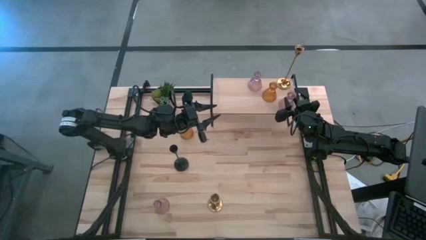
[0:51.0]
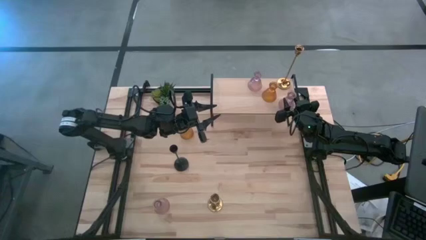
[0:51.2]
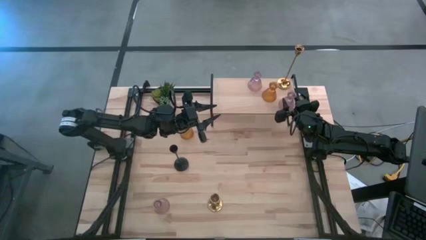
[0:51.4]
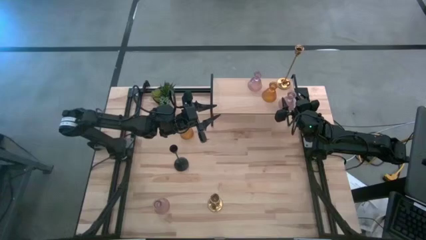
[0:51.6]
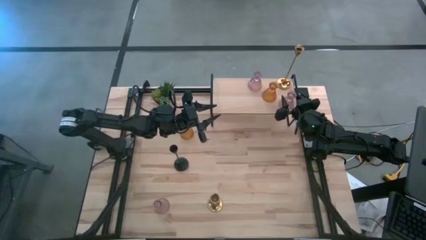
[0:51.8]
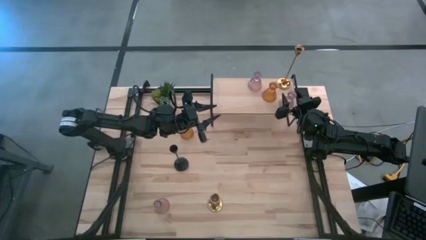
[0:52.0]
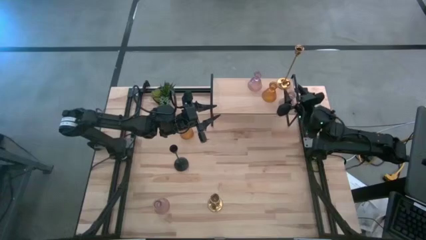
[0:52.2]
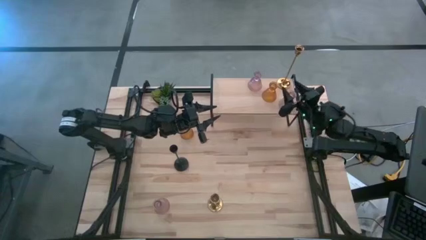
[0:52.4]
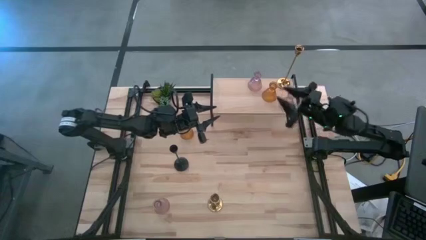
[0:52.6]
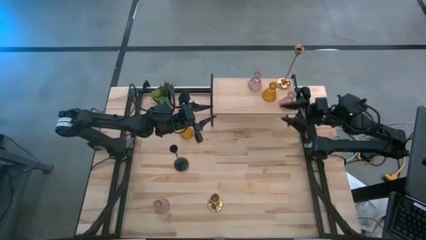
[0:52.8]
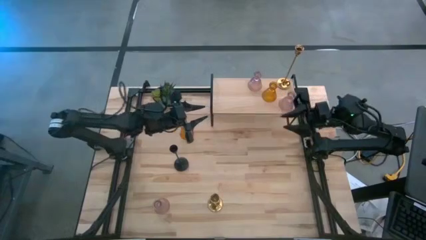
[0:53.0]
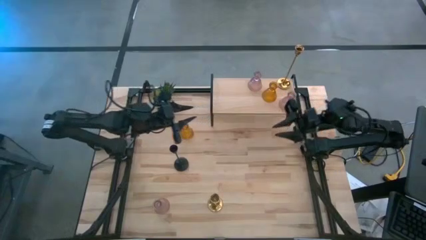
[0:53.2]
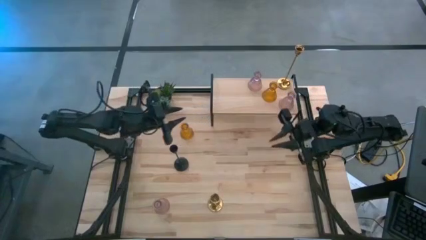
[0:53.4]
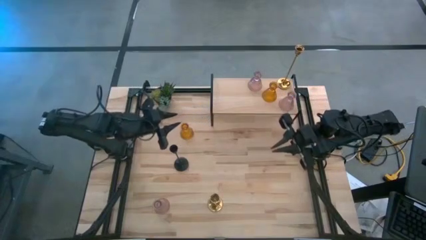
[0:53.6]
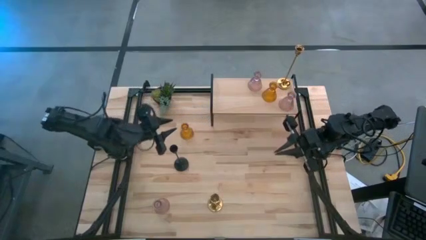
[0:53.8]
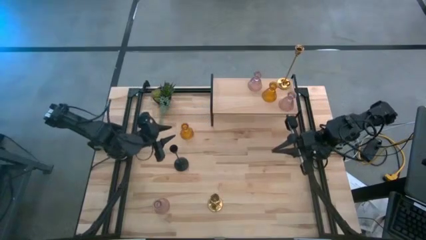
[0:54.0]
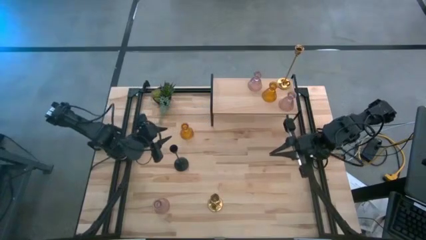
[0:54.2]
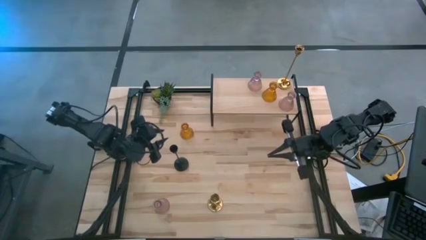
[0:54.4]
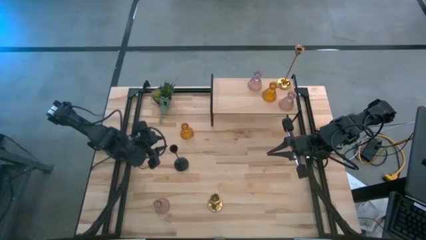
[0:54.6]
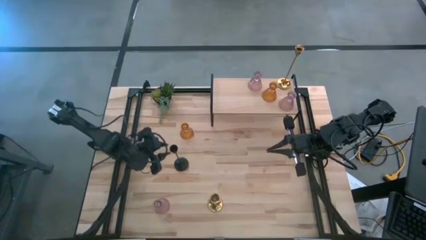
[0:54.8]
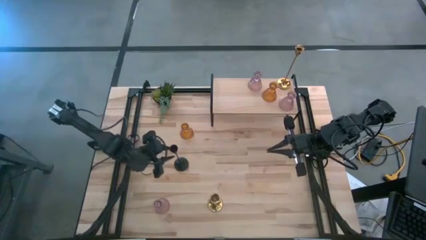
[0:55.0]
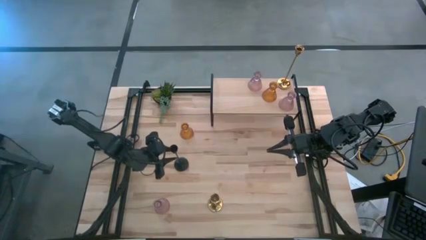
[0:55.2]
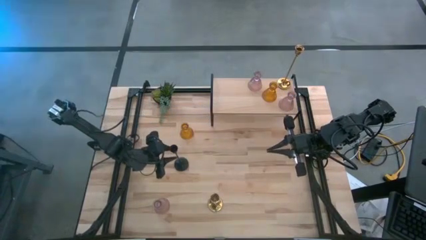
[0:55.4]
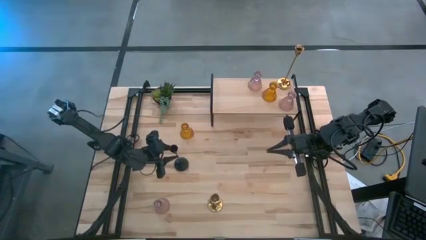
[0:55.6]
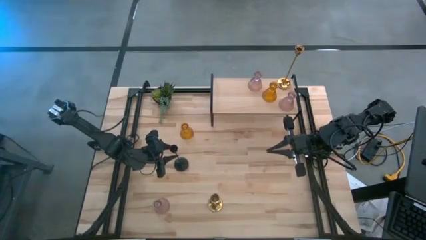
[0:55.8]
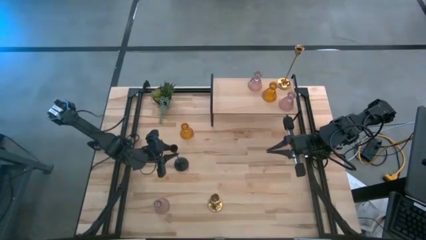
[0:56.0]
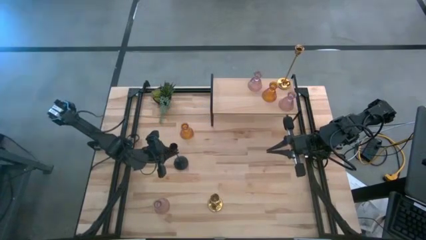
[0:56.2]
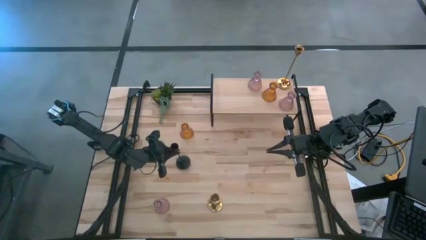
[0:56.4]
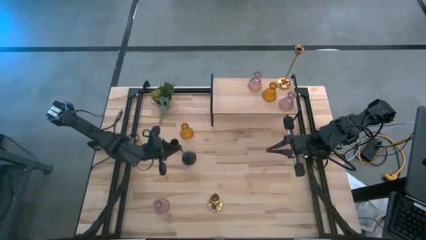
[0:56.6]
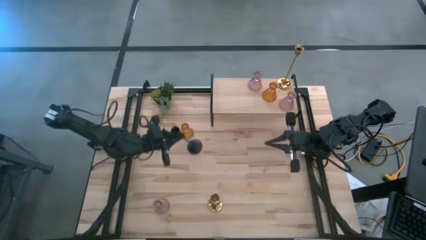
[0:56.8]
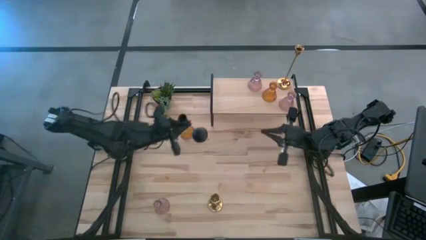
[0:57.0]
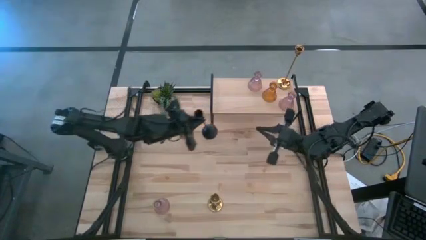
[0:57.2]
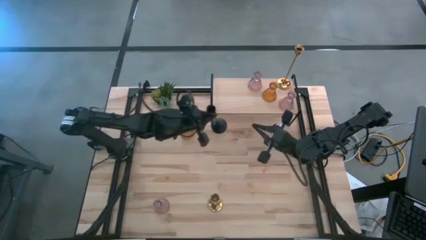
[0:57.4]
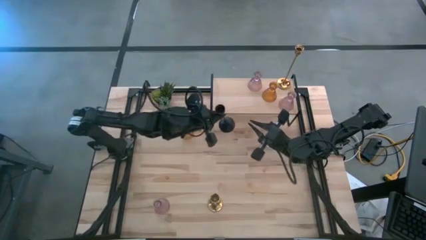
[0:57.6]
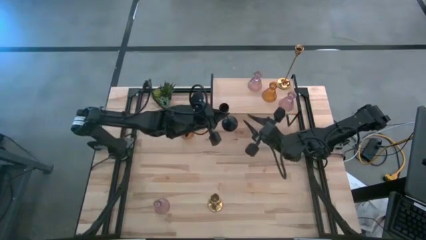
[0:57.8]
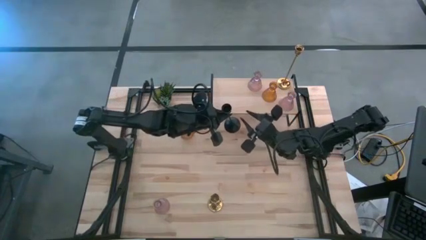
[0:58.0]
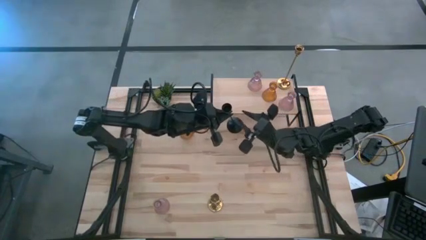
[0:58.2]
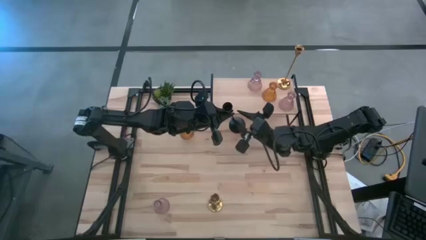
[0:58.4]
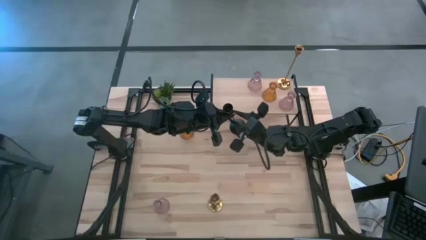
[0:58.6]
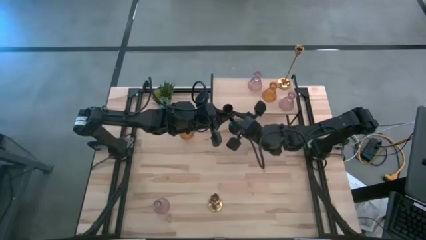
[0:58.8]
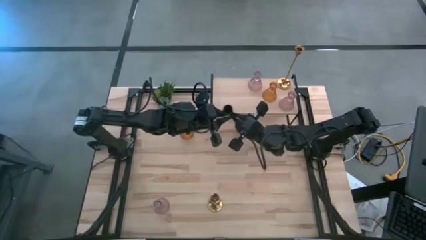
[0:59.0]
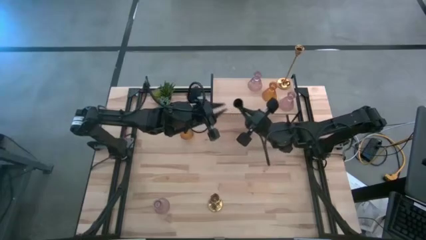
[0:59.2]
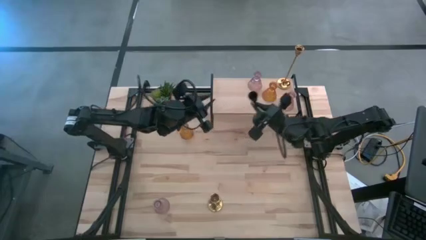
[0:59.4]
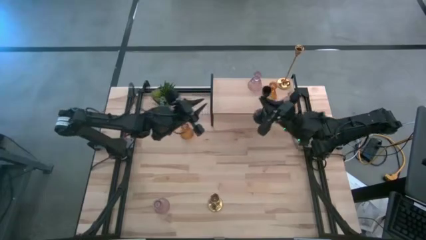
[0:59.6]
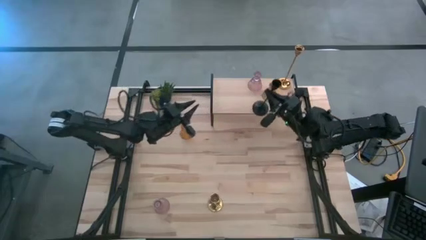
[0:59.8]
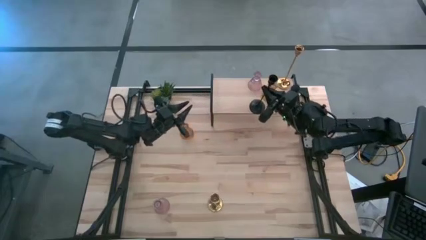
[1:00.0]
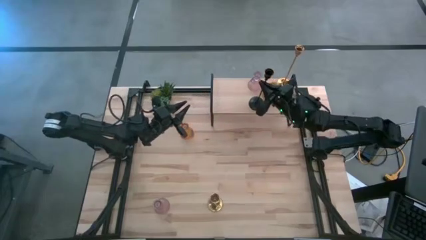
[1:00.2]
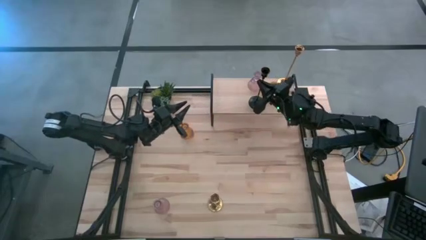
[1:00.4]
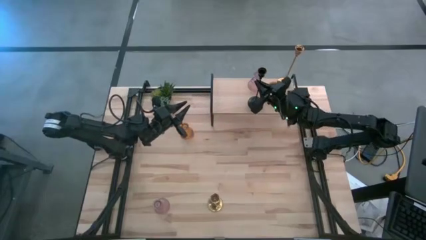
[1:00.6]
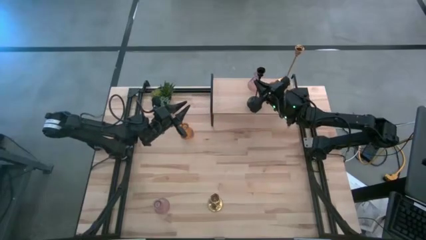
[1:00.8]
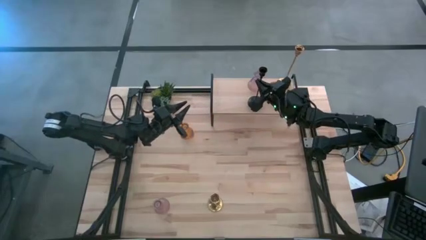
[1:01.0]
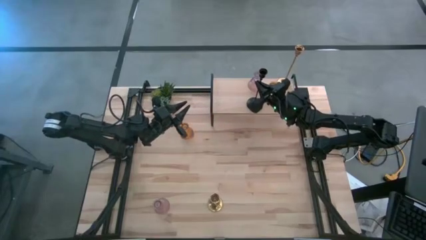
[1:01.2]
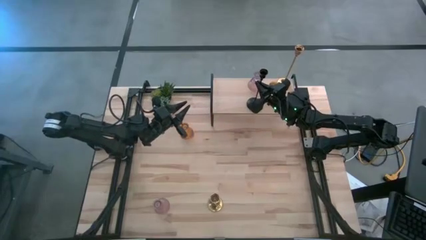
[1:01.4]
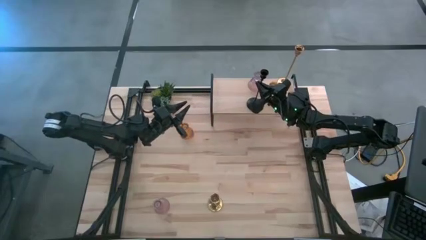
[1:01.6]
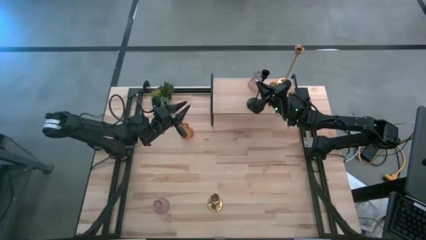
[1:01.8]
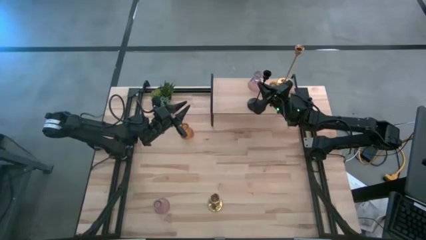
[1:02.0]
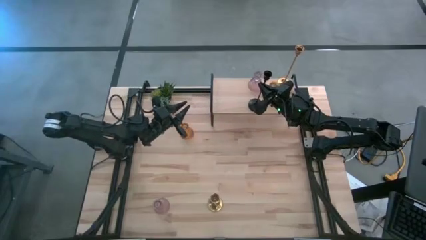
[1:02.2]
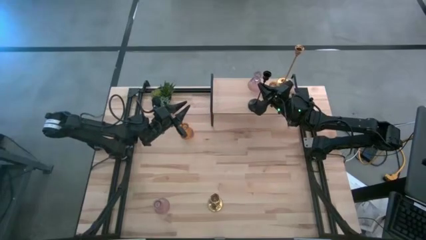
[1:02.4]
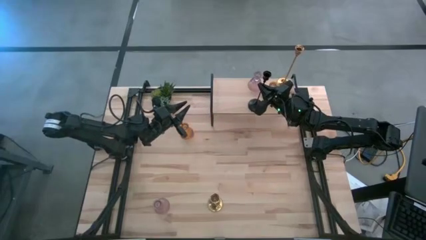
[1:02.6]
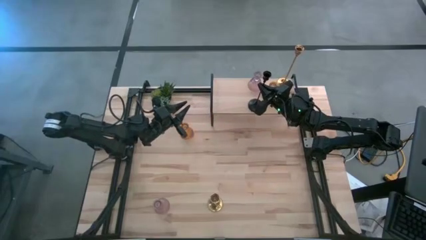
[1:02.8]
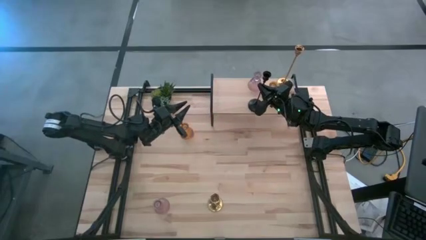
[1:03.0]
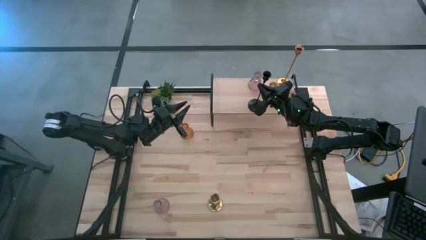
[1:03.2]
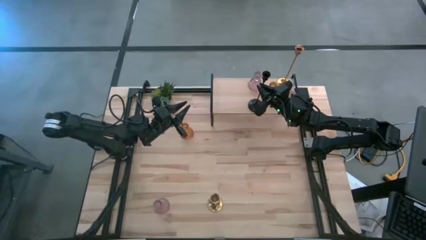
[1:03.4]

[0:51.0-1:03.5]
Task: Pick & Place candle stick holders
Put the black candle holder on the shelf
